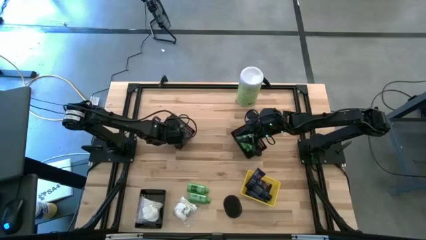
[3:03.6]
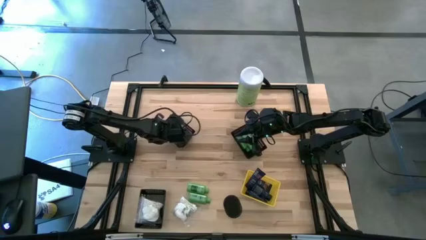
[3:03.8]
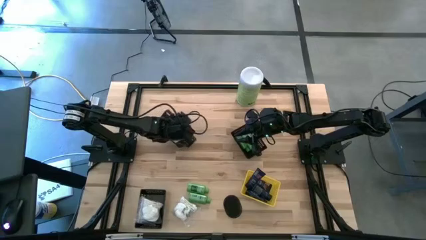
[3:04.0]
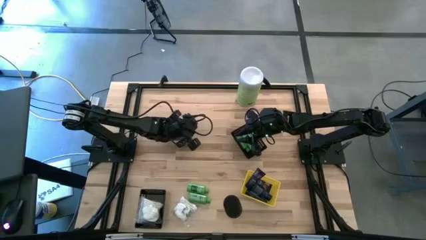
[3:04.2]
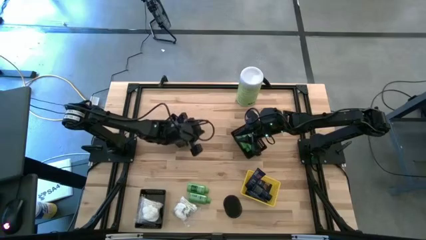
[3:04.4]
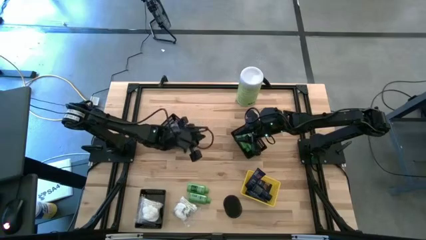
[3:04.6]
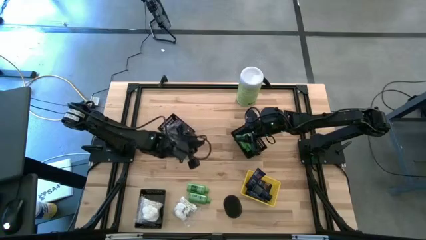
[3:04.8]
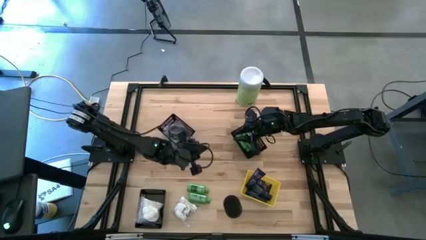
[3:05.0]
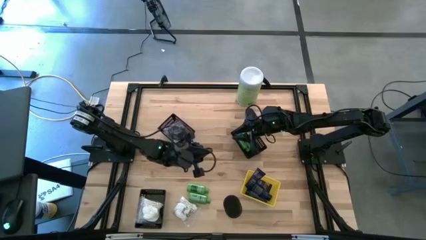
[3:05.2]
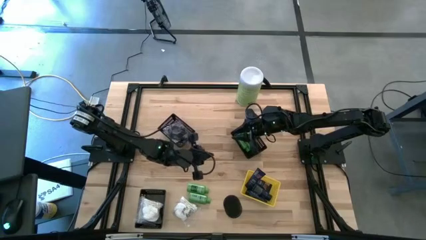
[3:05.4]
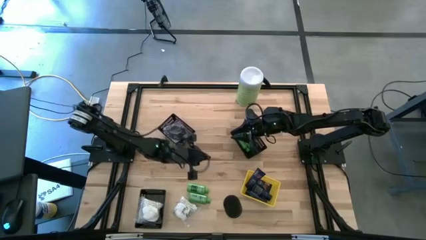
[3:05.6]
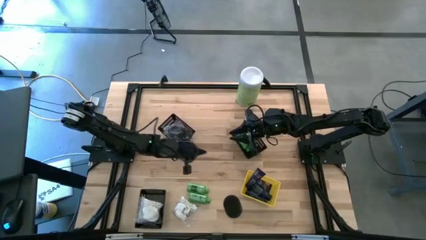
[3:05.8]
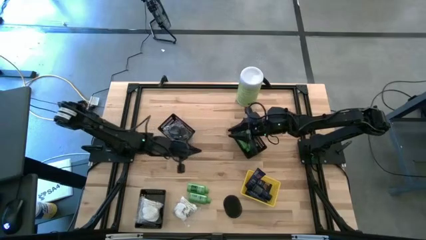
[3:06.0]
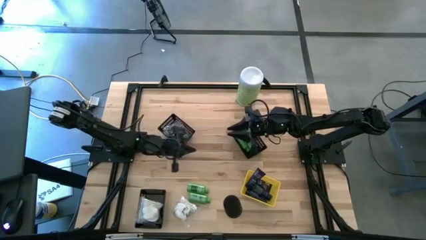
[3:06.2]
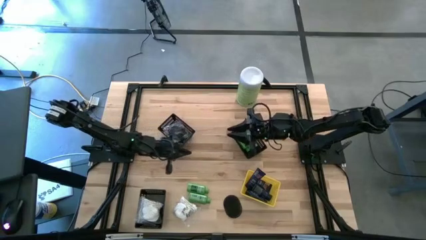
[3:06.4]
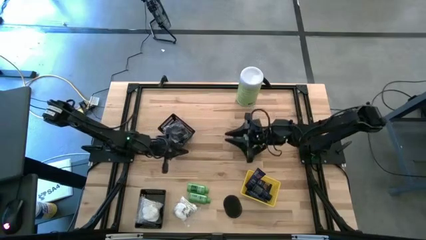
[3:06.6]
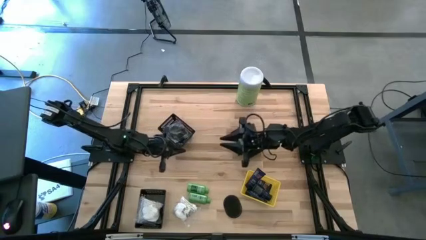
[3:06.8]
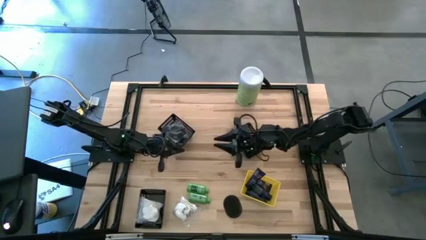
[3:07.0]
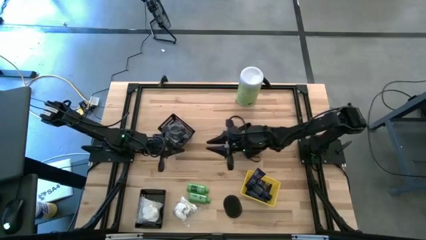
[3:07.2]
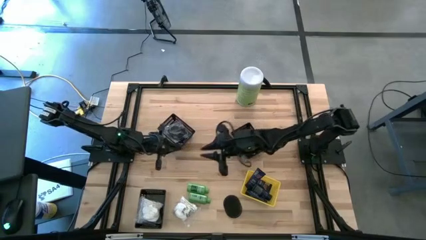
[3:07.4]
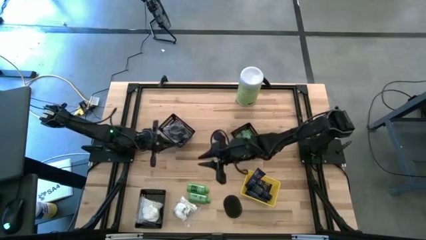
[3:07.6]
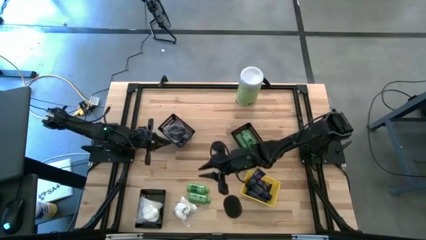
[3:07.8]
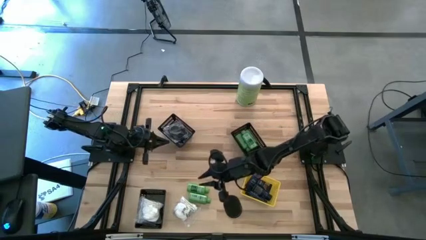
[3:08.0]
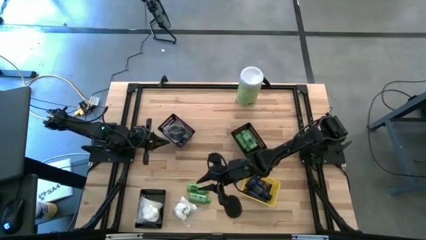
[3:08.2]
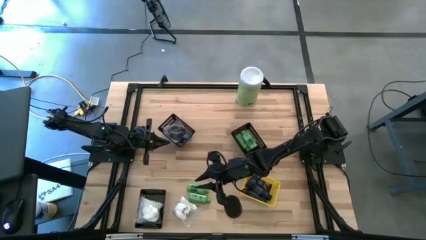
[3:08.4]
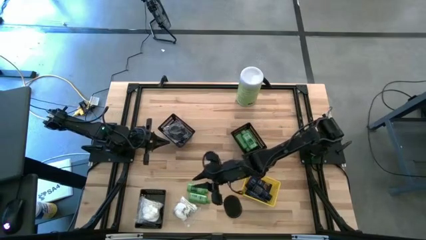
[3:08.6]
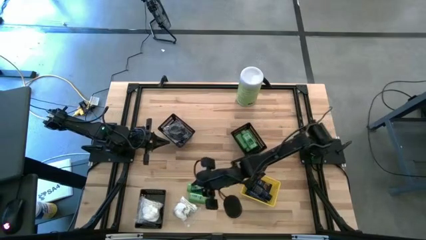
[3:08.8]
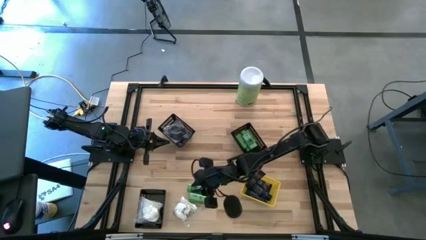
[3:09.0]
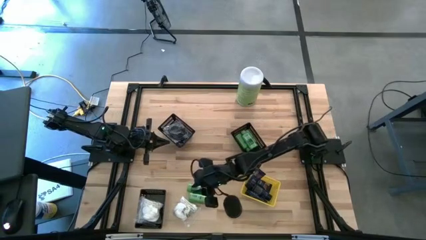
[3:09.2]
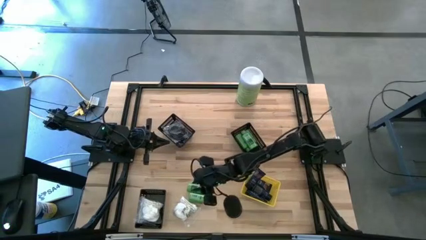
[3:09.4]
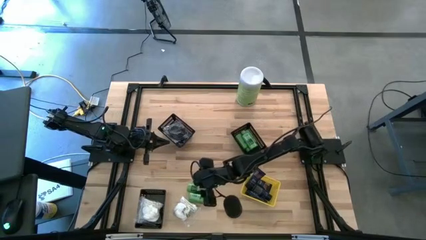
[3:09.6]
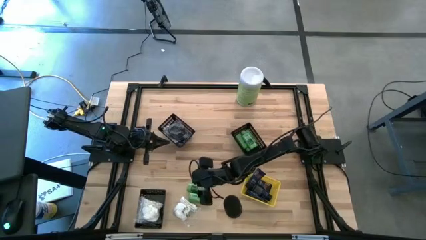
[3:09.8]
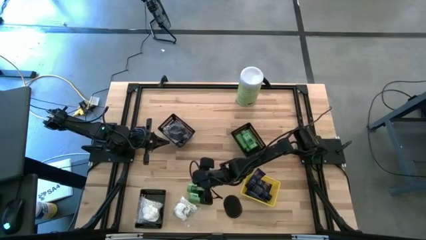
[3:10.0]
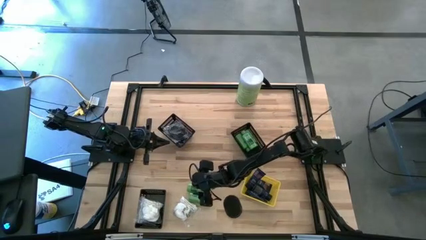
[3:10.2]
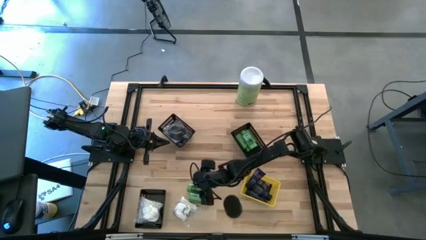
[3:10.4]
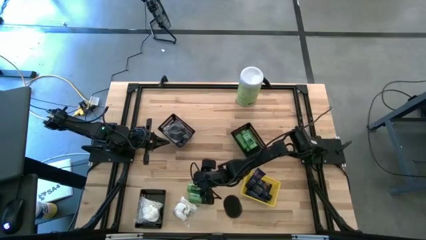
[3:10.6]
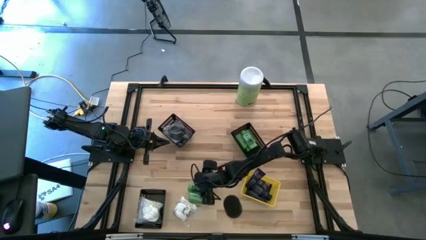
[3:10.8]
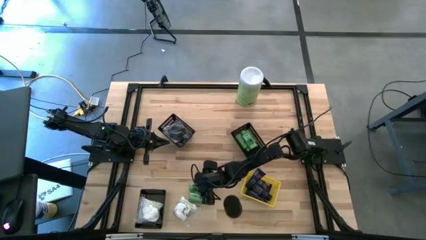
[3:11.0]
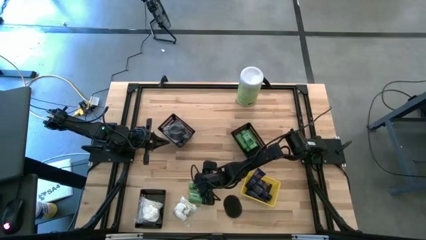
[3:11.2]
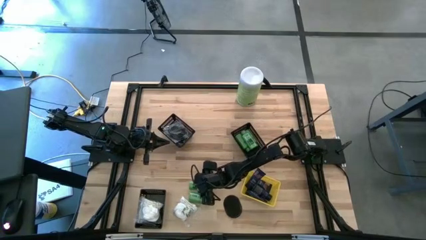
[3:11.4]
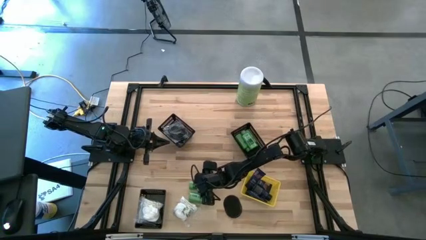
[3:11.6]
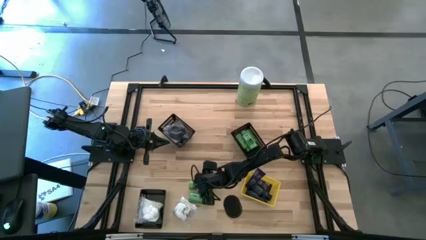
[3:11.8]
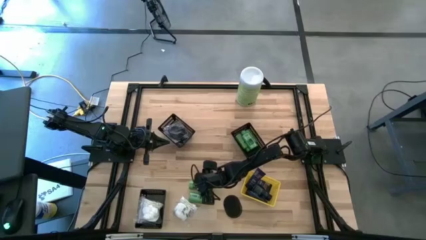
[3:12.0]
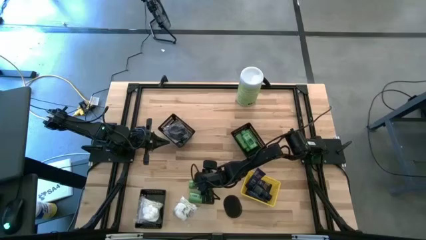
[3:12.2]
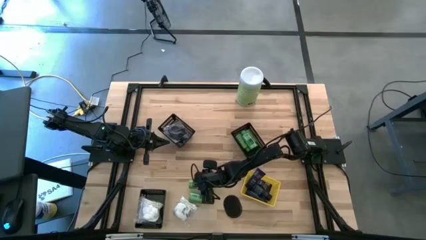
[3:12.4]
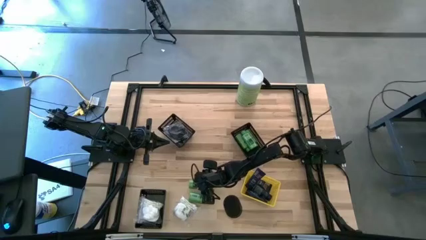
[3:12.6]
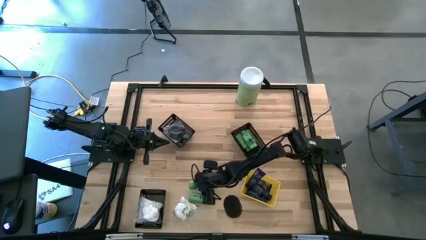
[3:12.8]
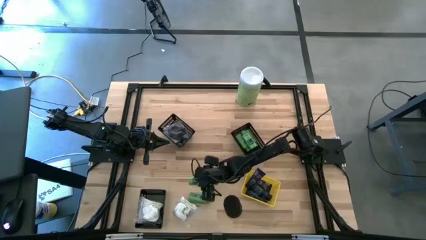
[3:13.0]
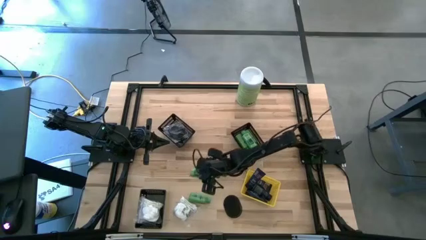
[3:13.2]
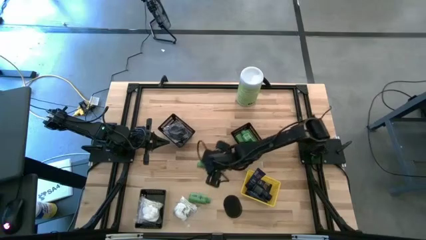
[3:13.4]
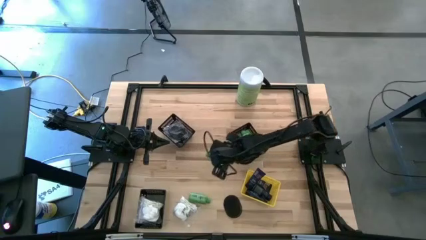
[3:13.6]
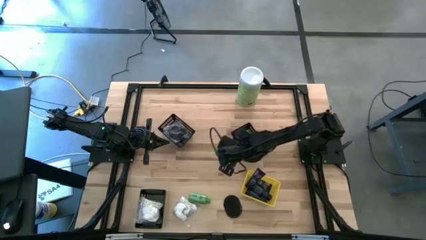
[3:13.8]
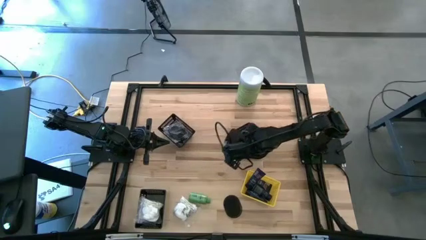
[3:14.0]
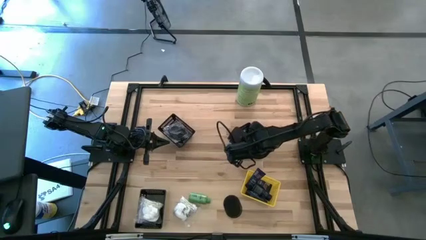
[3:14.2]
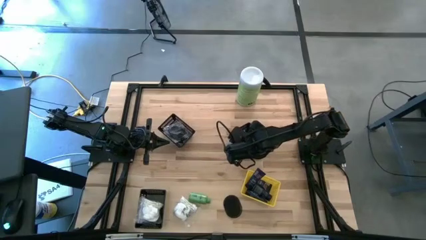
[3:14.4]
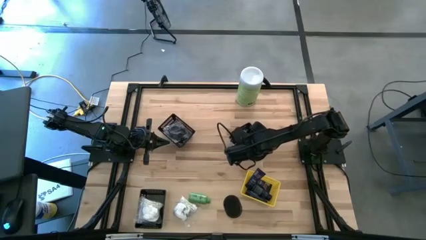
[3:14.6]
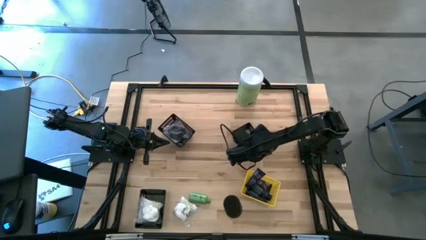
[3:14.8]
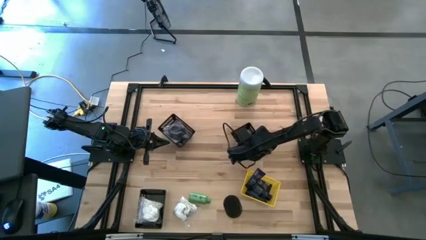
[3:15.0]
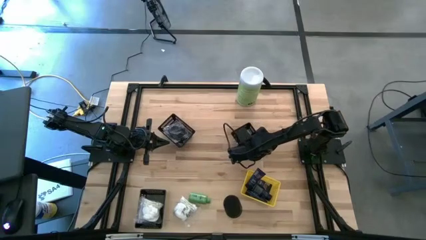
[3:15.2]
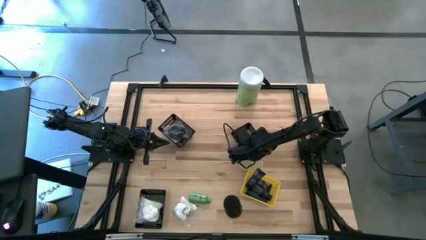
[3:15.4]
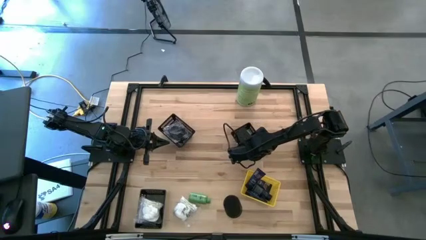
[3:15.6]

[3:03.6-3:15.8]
Task: Pick & Place Travel size toiletries
Put the shampoo bottle into the top right black bin

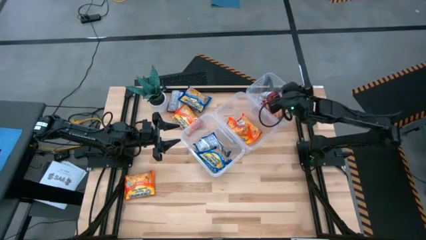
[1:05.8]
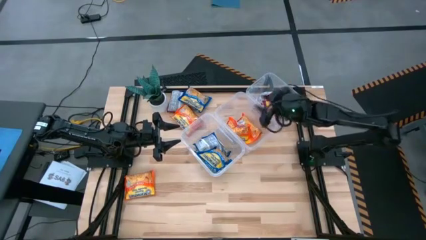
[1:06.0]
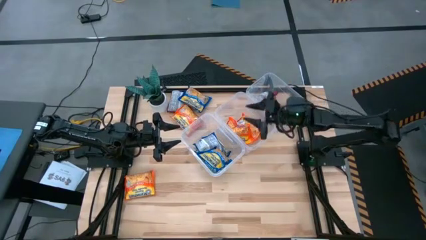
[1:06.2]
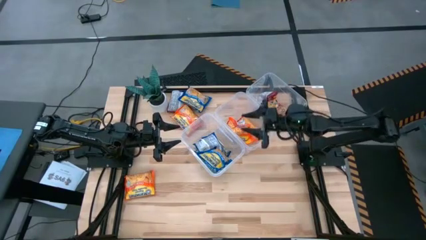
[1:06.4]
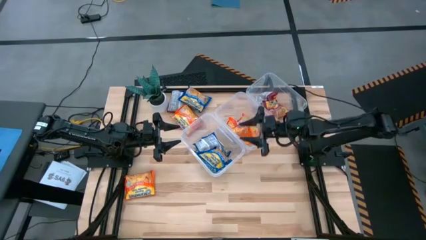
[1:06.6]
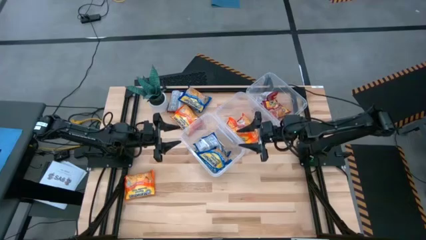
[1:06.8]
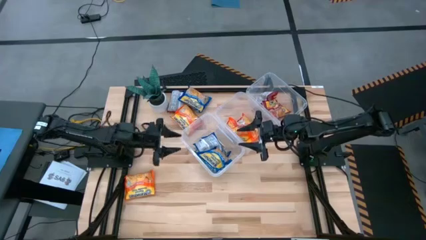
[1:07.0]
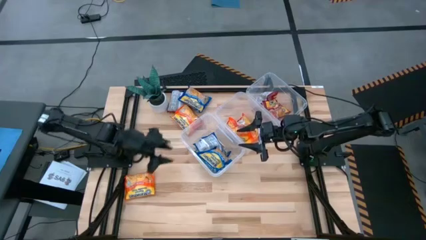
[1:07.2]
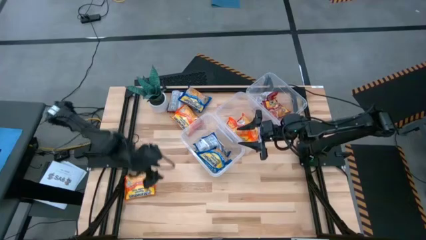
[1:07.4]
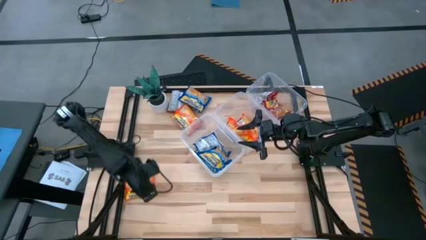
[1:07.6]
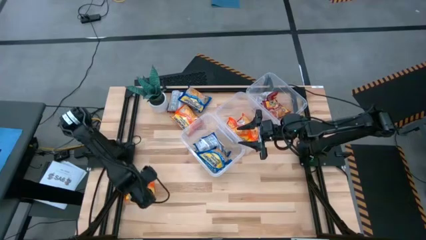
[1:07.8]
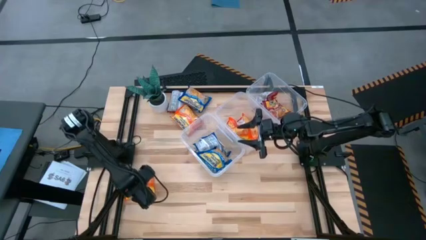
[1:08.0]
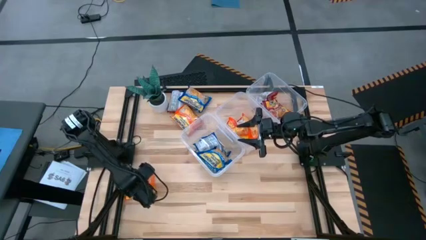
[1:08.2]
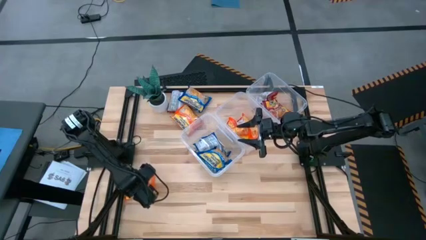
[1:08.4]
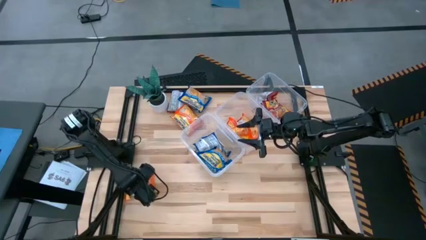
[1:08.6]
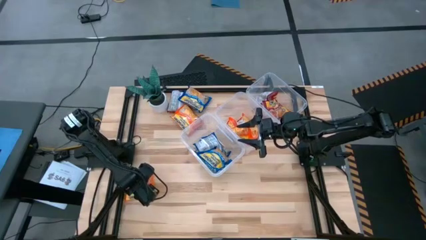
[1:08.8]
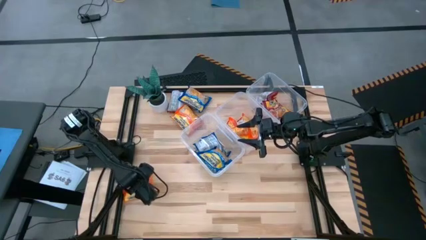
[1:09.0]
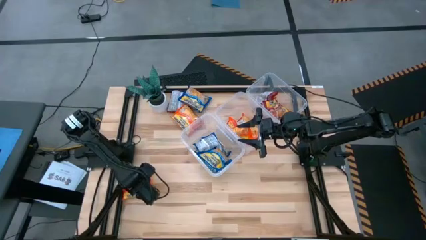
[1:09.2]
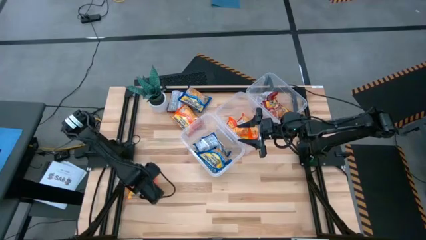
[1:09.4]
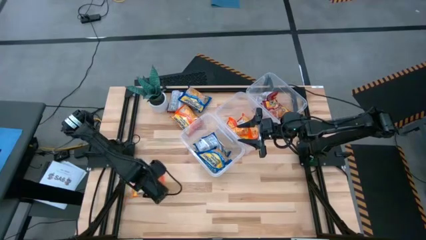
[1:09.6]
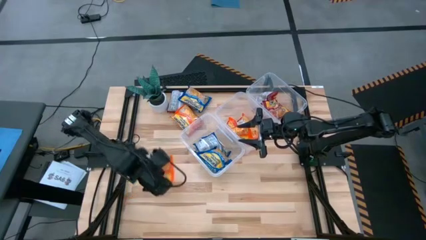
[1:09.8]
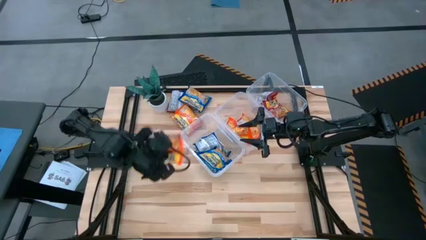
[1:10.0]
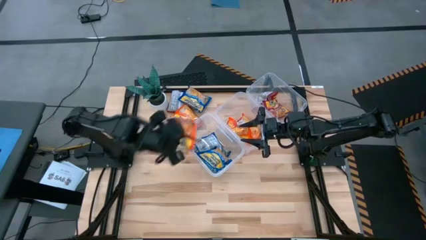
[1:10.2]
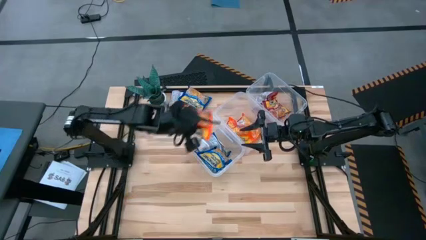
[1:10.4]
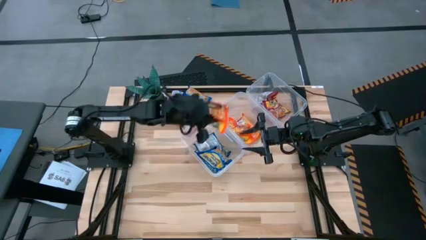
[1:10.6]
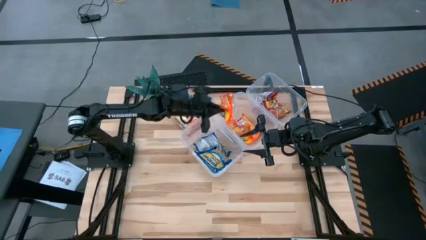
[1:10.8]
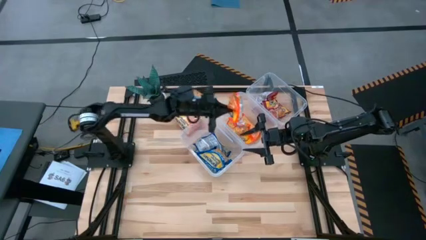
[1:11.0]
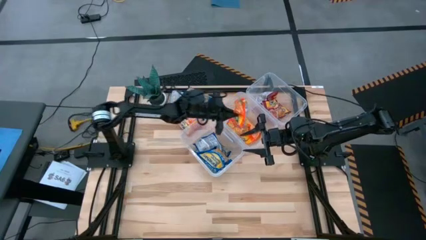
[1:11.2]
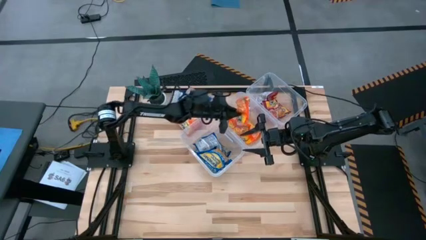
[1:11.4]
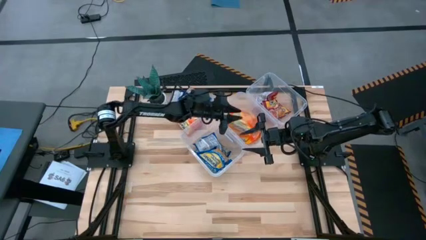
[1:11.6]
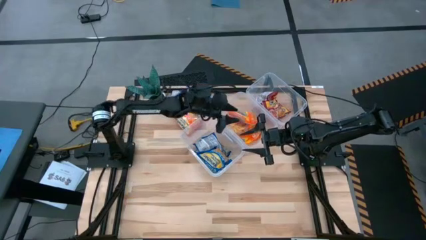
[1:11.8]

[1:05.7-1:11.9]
Task: Sort Maruchan noodles
Put the orange noodle pack into the middle transparent bin
